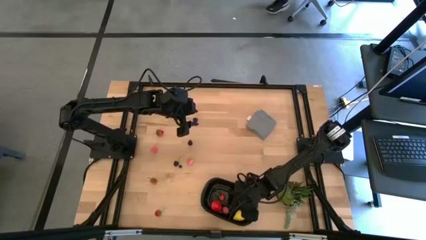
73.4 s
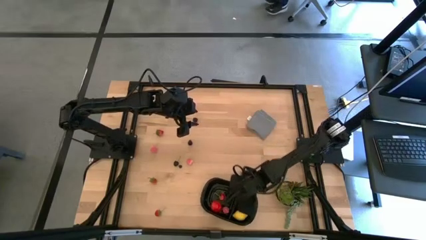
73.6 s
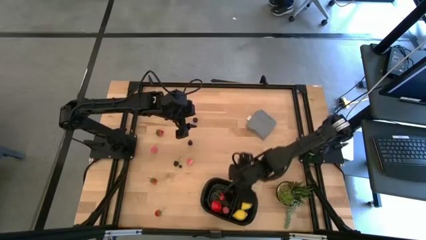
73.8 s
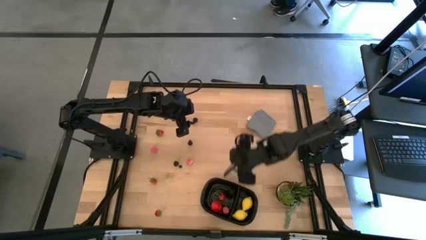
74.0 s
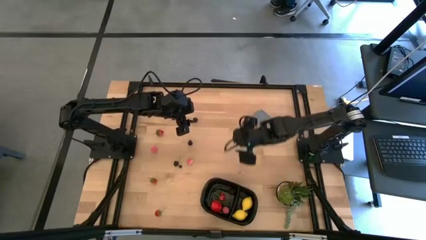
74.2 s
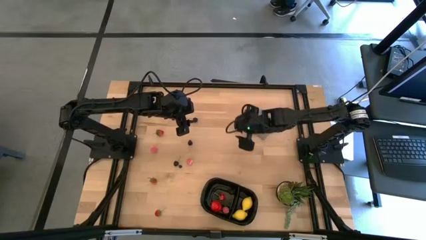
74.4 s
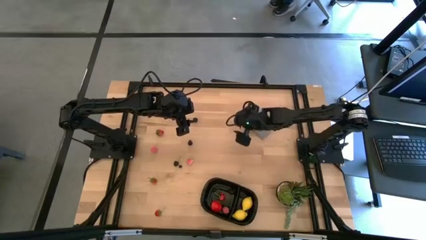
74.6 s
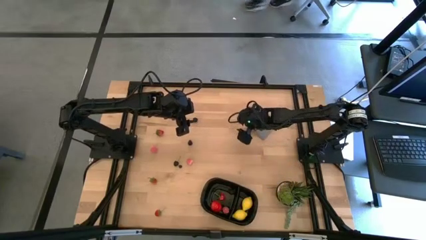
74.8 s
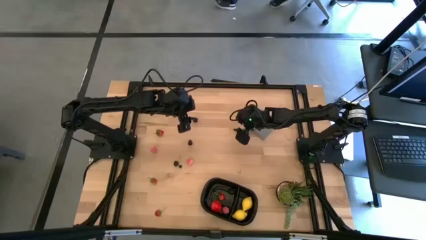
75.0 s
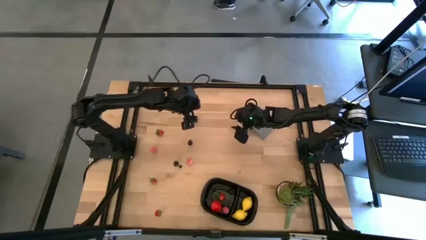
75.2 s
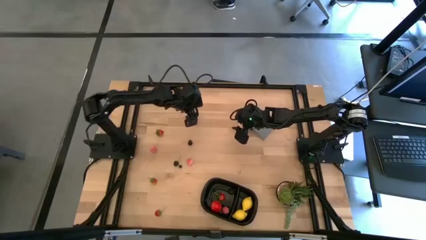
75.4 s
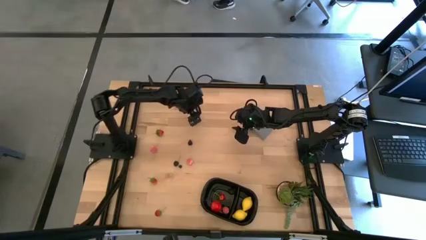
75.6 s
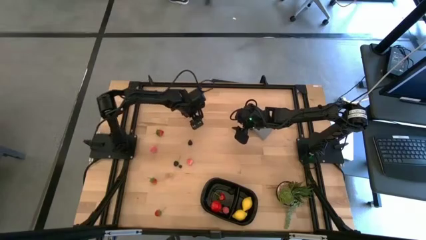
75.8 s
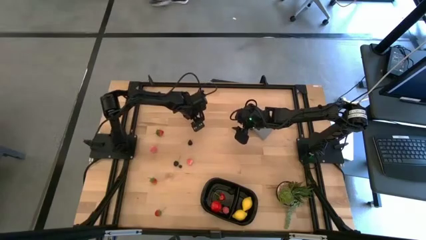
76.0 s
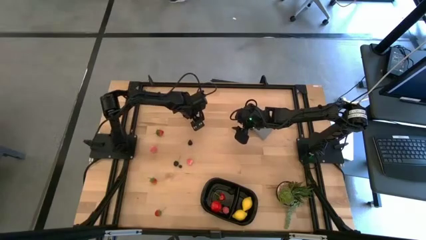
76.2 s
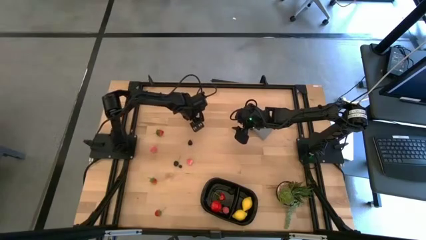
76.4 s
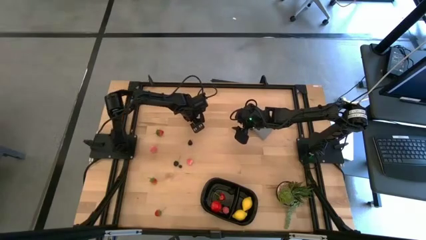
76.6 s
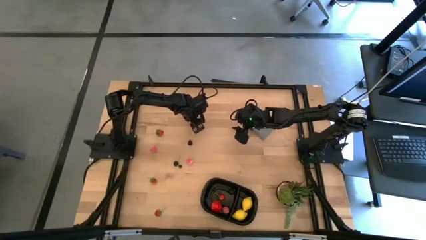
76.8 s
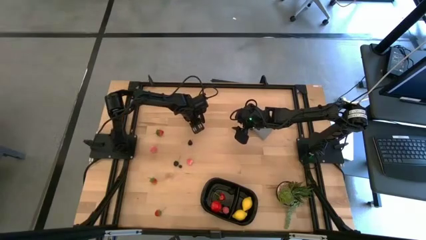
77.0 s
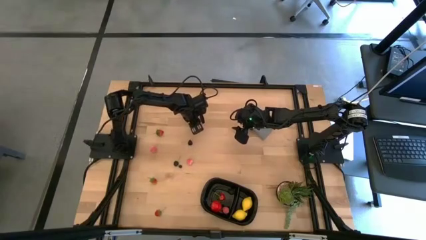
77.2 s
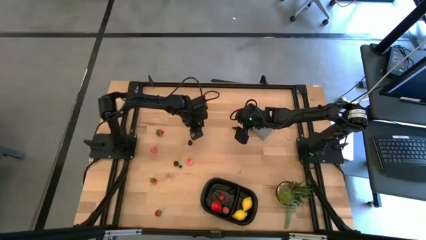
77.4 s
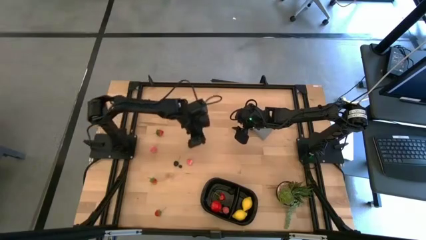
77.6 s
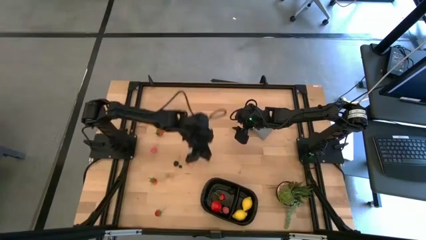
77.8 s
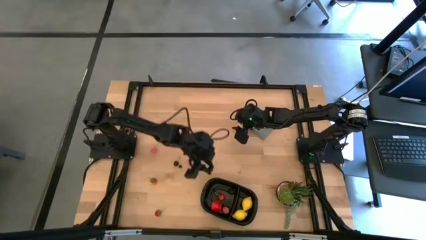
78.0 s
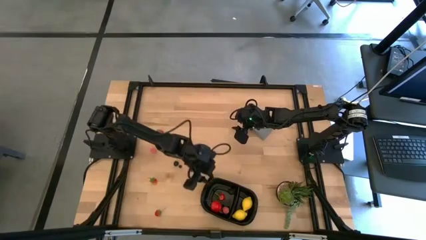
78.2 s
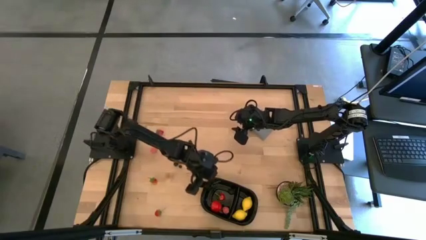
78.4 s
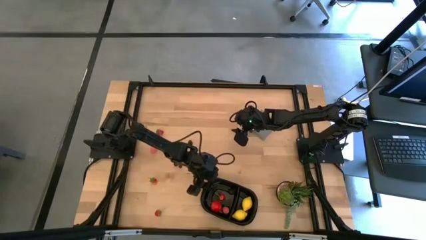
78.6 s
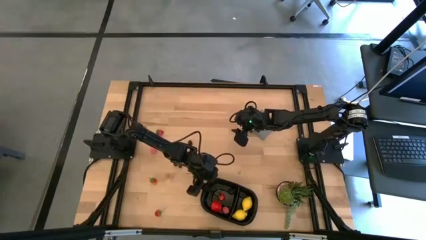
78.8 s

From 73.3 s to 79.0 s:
Task: Pick and placing Produce into tupperware
Put the cherry into the black bin

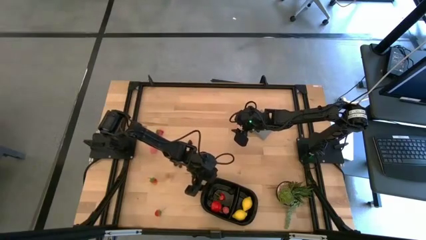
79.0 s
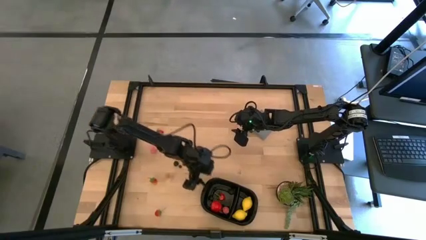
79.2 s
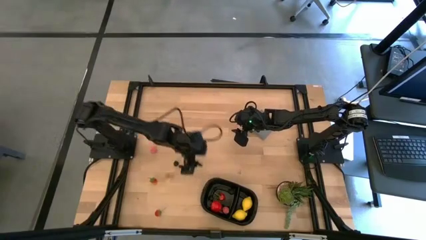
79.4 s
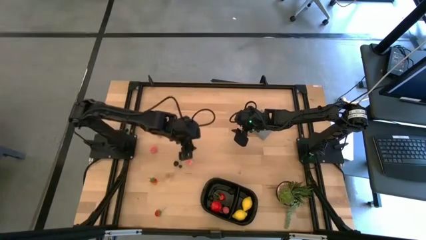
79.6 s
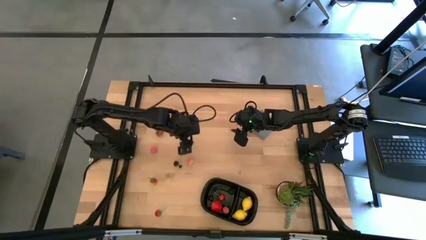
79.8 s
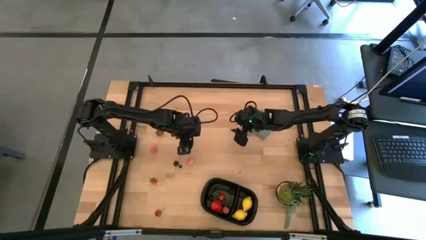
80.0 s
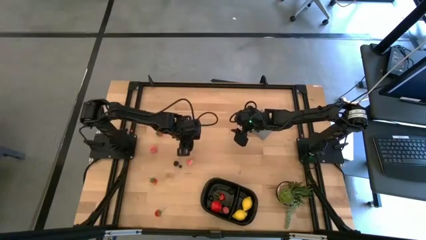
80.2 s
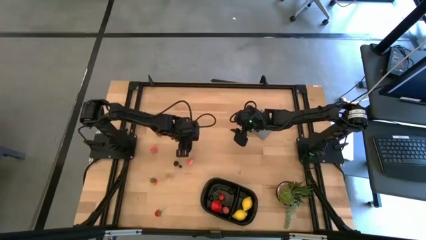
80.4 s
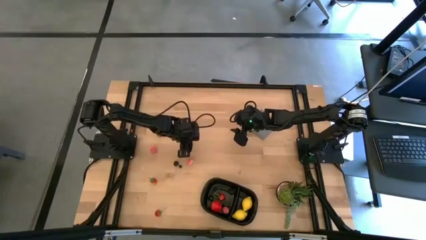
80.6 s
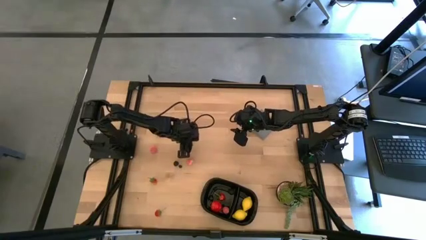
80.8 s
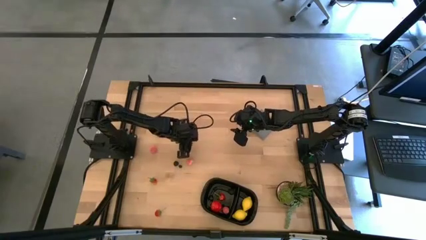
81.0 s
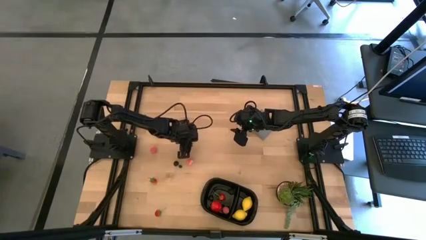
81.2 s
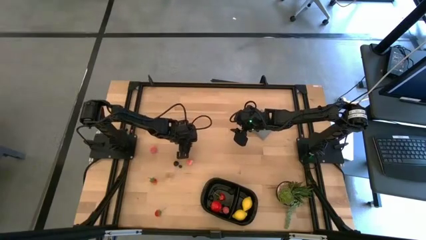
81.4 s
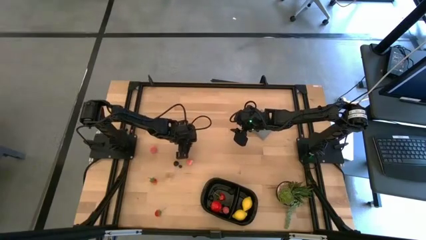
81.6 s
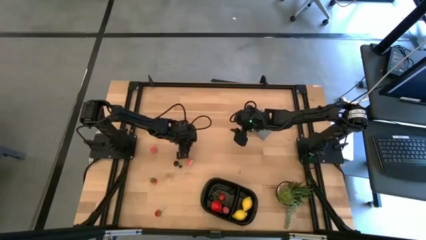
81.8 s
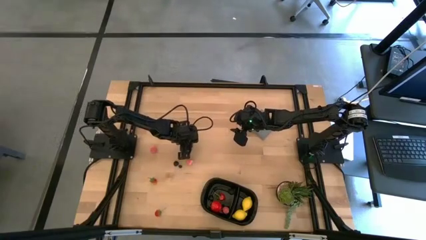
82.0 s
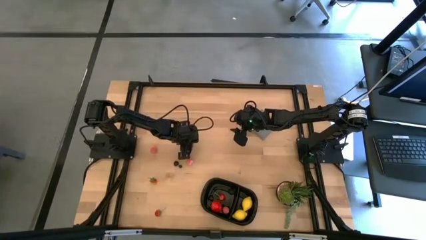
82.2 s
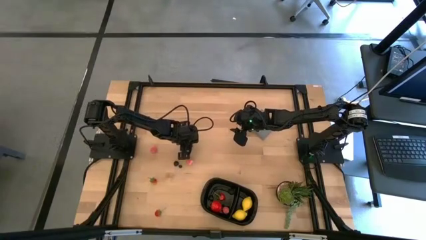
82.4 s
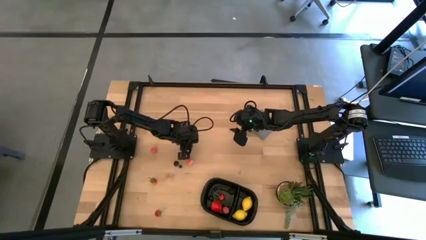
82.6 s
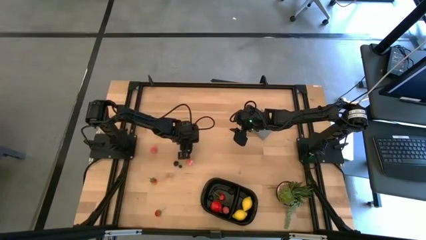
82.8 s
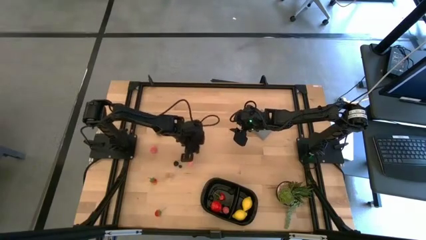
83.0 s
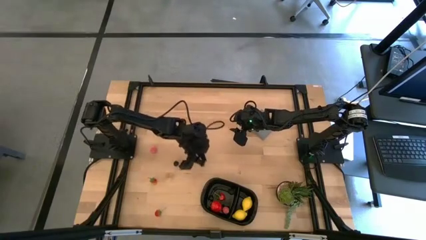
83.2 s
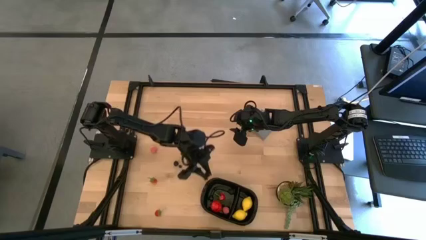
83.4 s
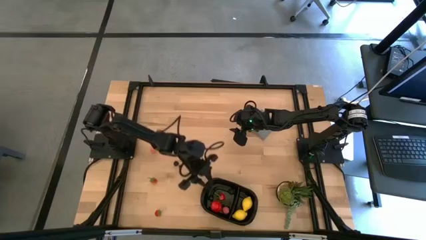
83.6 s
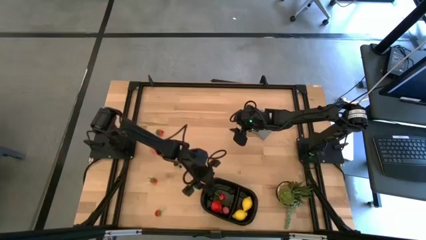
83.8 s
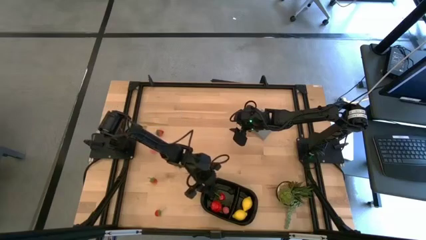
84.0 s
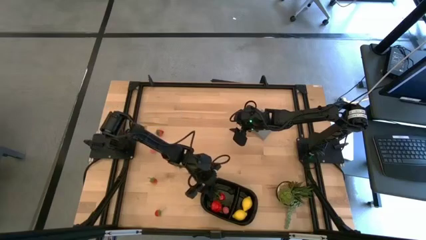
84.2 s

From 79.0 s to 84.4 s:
Put the blackberry into the black bin

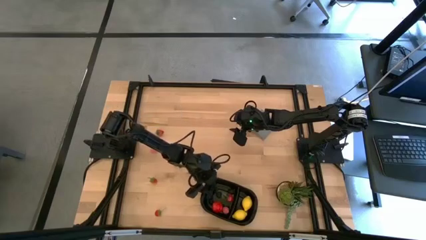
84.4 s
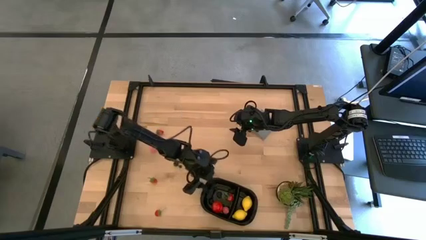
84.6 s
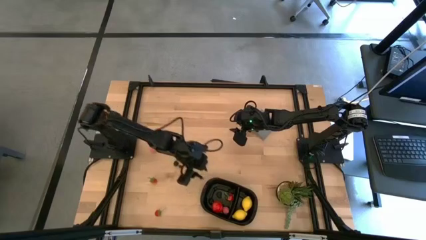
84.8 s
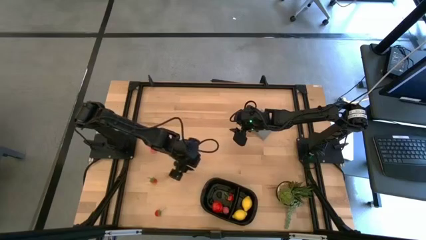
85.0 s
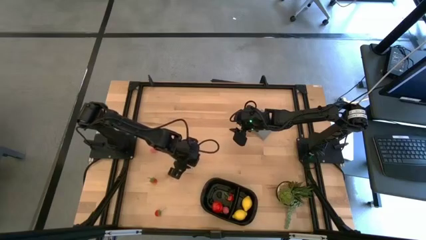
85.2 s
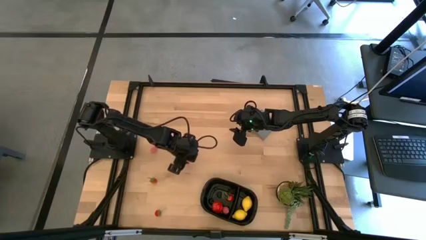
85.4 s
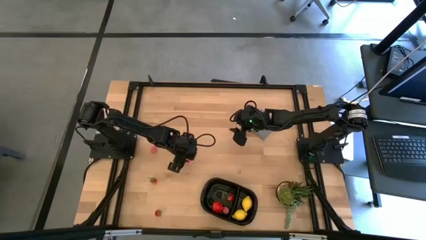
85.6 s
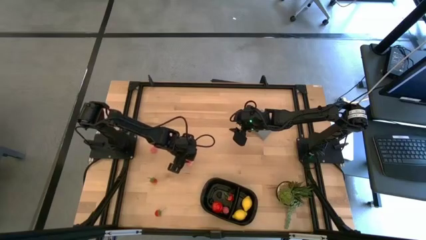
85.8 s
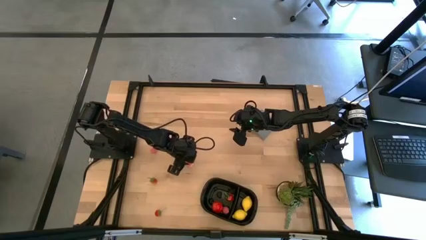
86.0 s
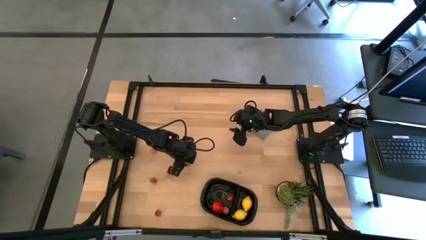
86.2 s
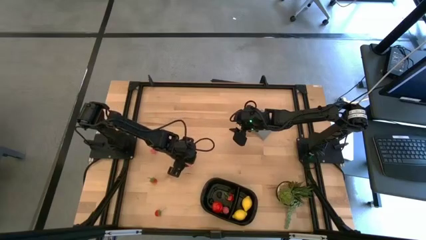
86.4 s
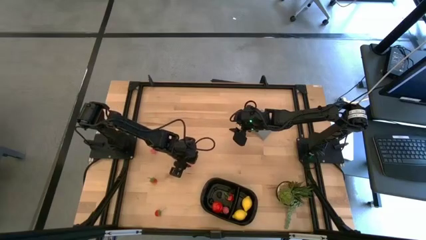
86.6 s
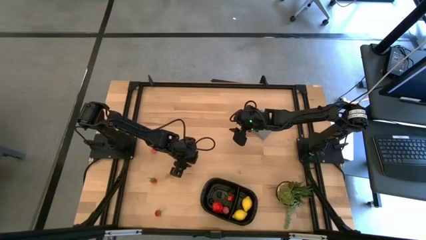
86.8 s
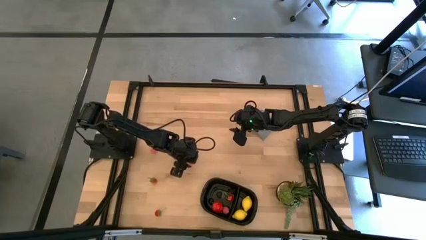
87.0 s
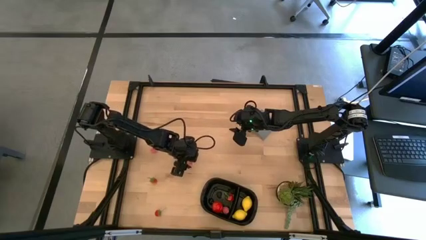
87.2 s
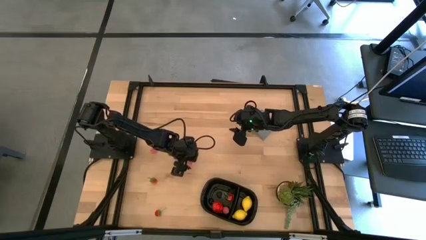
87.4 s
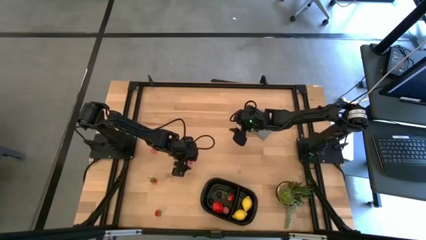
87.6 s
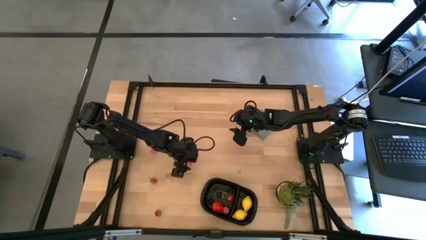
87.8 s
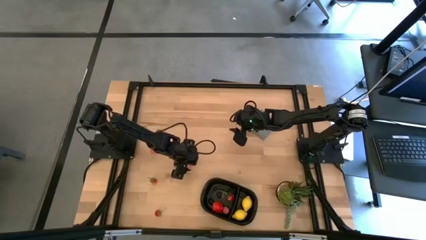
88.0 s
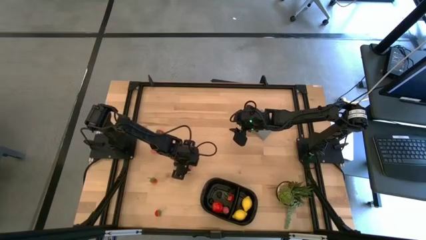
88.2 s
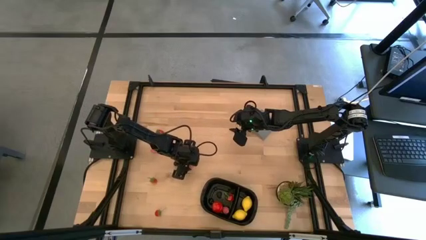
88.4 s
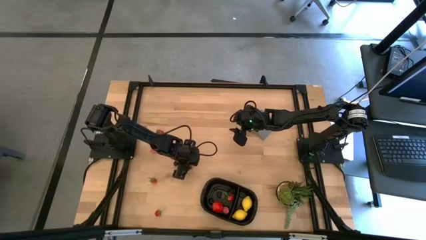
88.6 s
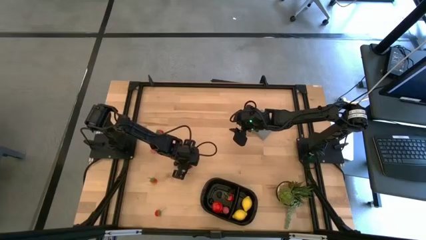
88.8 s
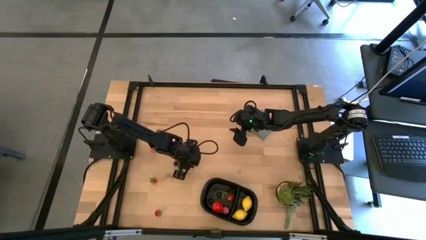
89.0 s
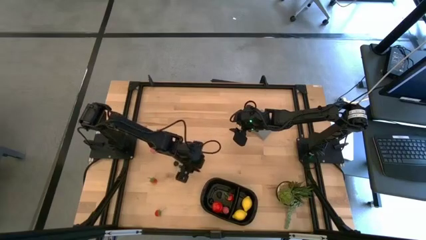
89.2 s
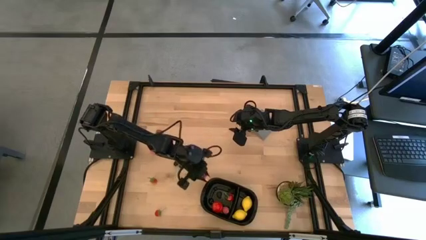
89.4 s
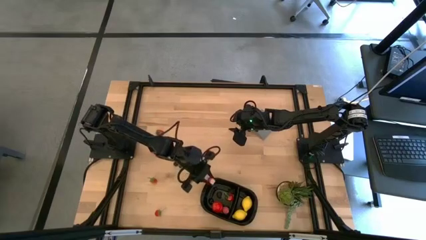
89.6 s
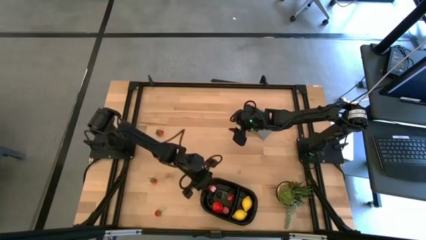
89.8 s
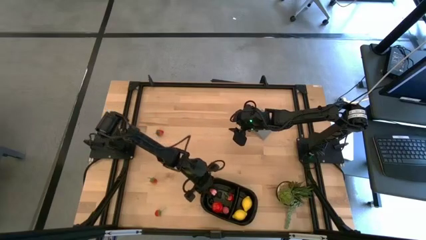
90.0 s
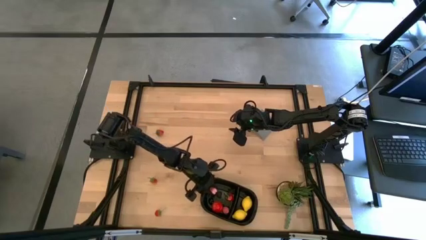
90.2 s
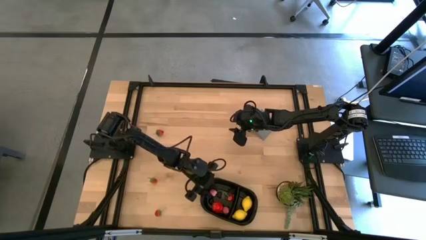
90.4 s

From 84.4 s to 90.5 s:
Put the peach into the black bin
